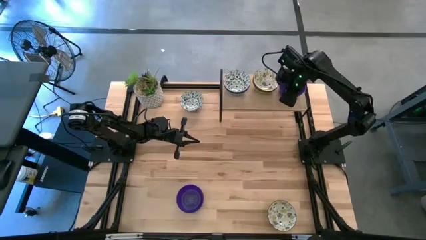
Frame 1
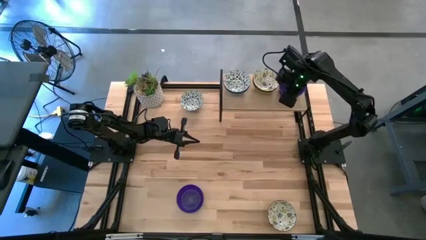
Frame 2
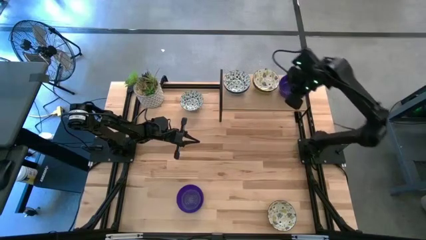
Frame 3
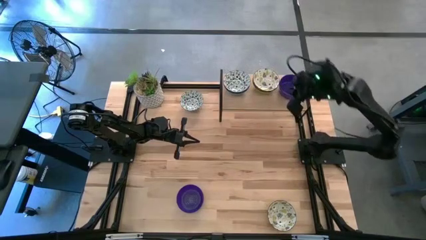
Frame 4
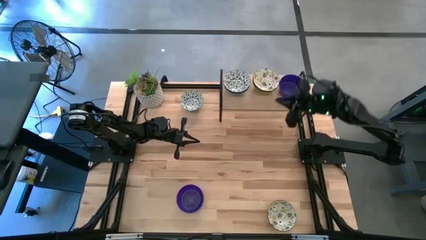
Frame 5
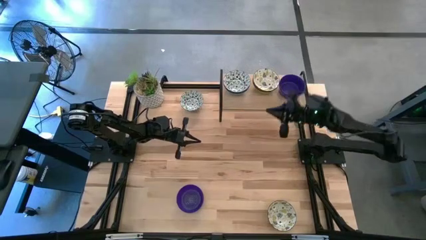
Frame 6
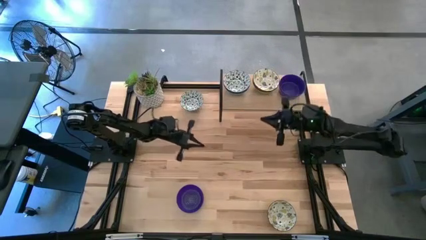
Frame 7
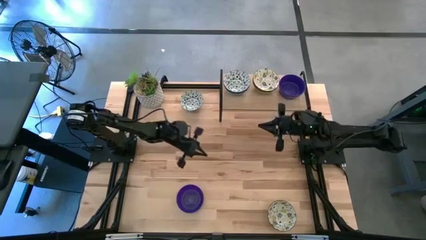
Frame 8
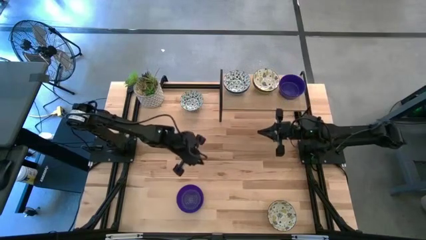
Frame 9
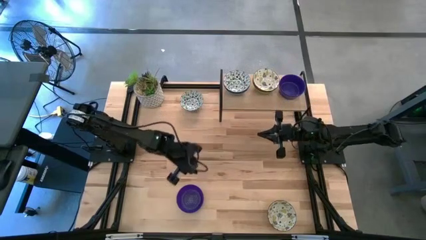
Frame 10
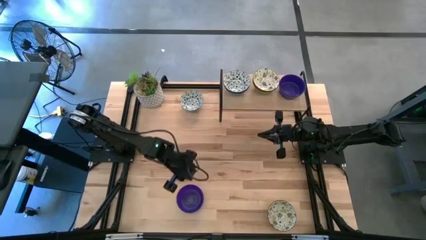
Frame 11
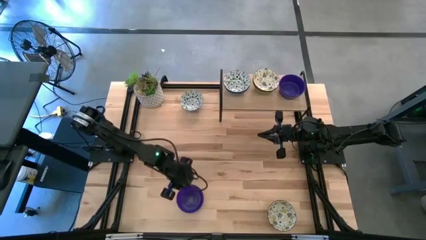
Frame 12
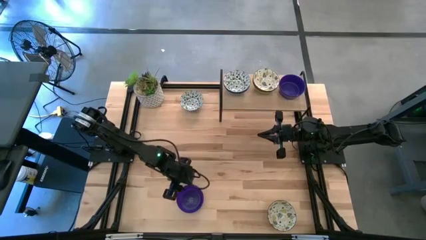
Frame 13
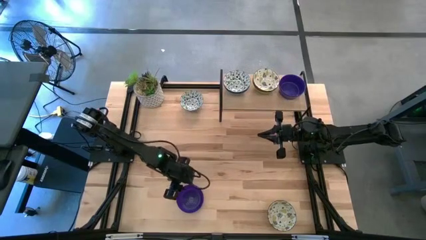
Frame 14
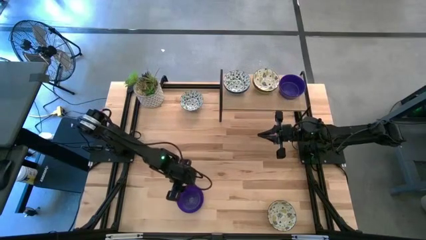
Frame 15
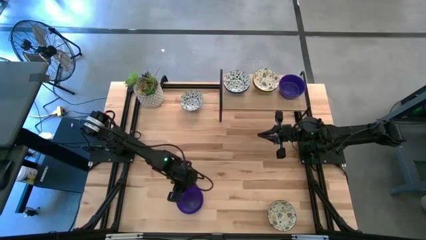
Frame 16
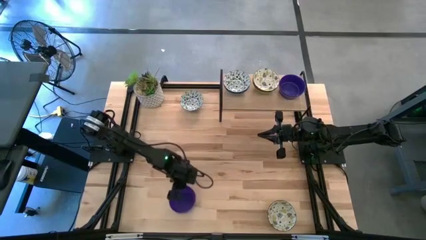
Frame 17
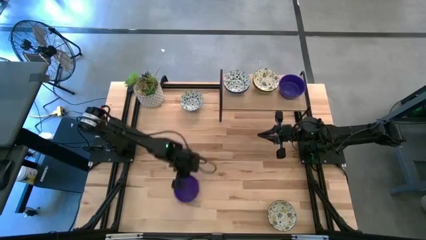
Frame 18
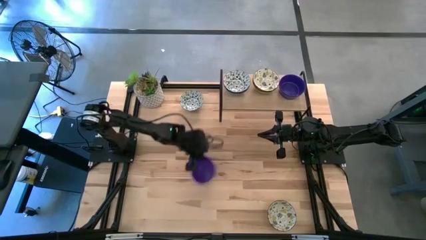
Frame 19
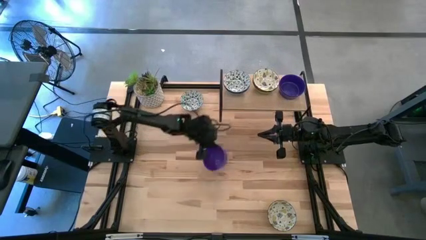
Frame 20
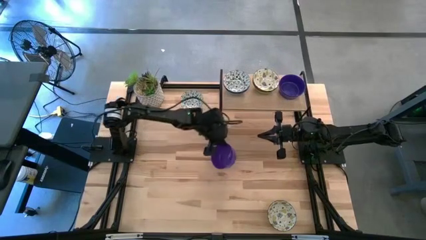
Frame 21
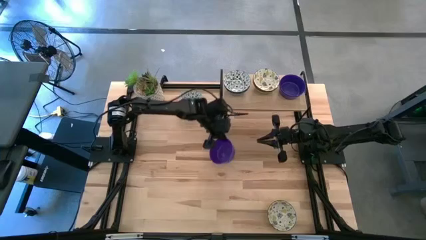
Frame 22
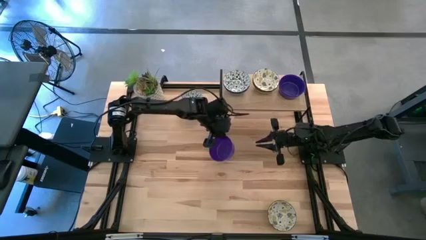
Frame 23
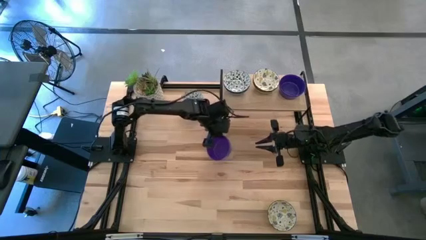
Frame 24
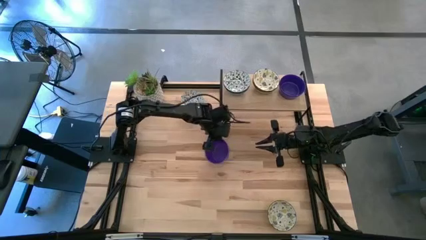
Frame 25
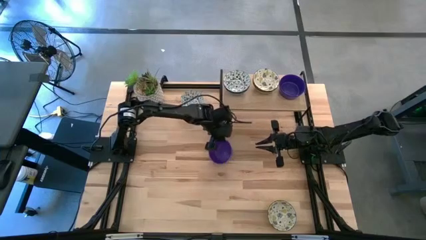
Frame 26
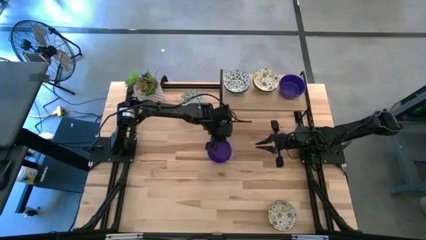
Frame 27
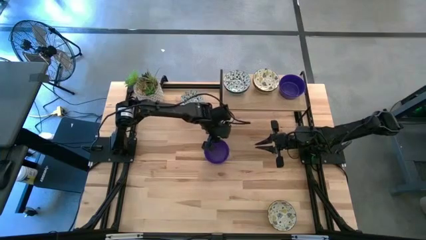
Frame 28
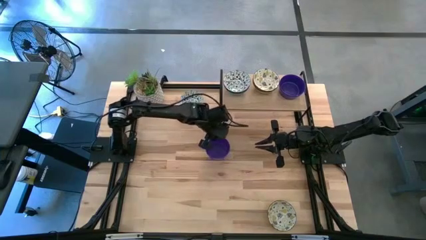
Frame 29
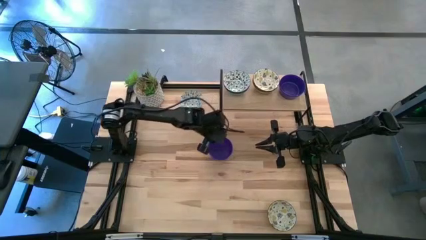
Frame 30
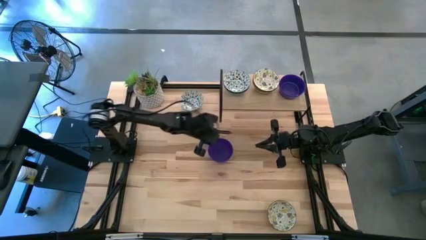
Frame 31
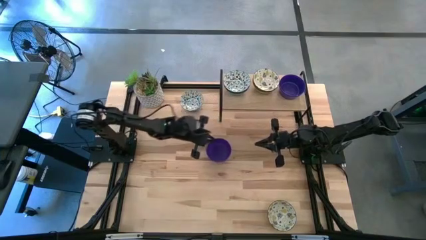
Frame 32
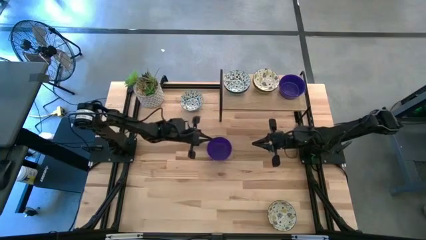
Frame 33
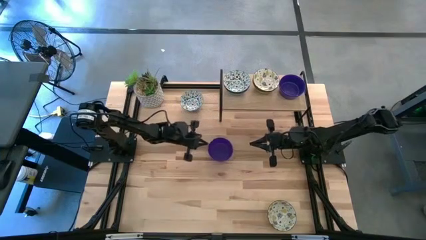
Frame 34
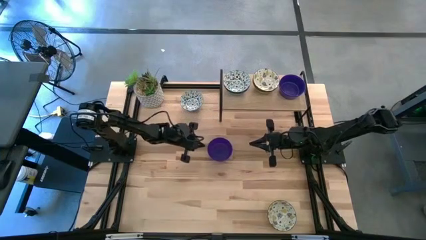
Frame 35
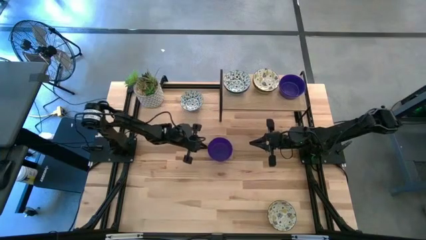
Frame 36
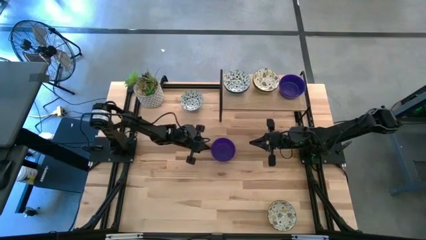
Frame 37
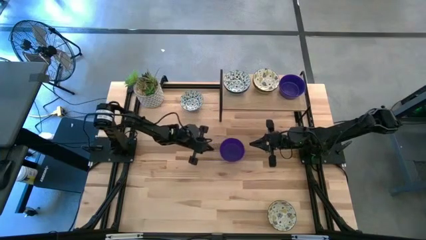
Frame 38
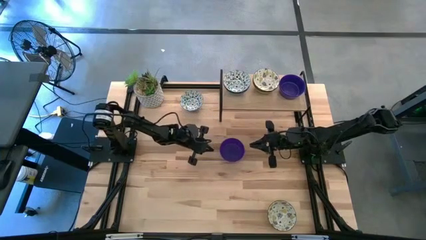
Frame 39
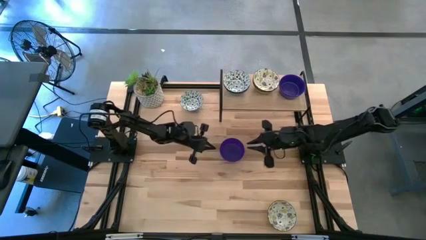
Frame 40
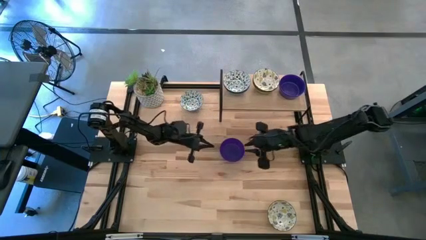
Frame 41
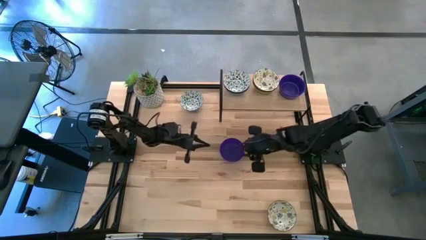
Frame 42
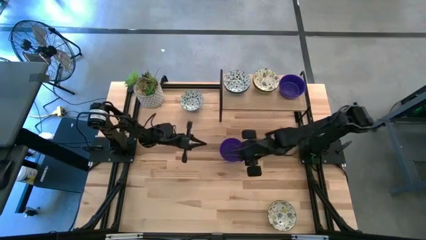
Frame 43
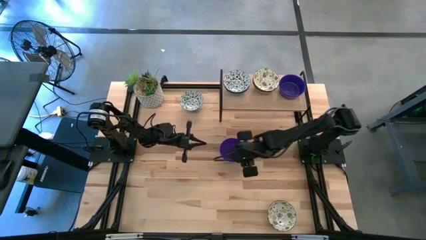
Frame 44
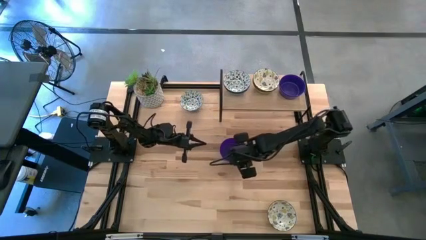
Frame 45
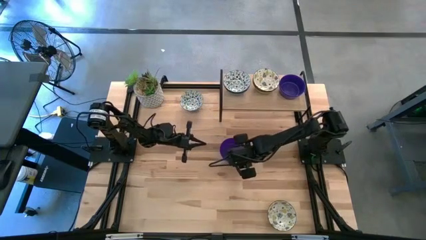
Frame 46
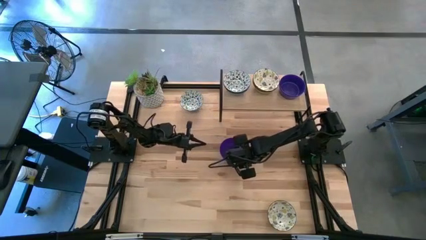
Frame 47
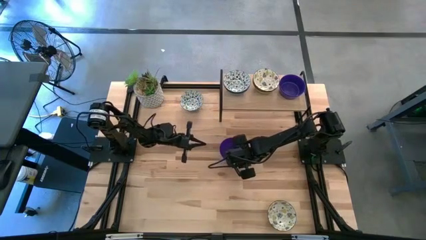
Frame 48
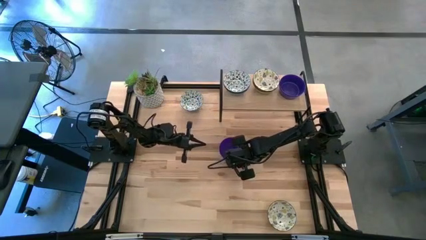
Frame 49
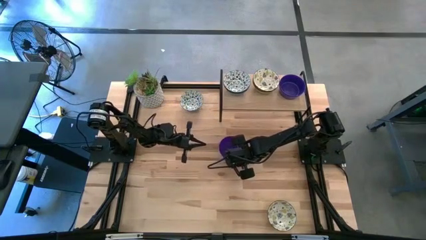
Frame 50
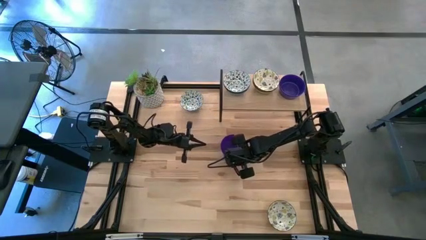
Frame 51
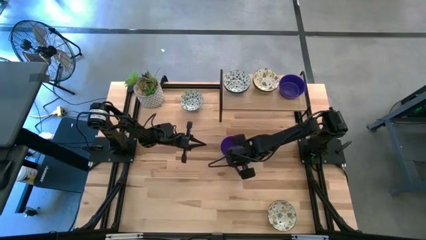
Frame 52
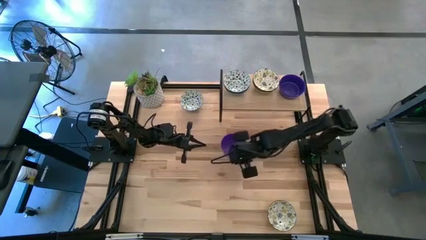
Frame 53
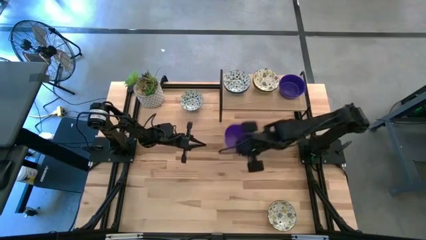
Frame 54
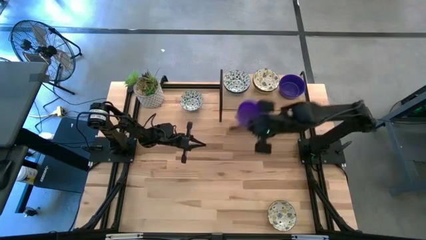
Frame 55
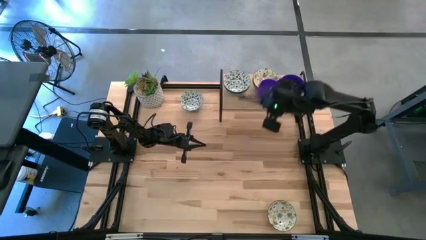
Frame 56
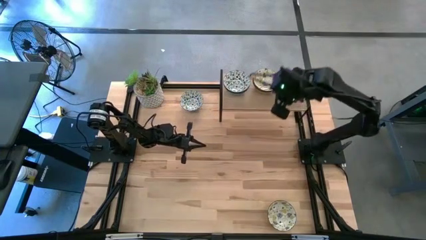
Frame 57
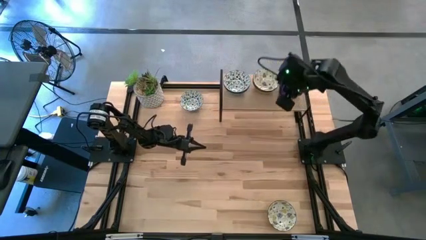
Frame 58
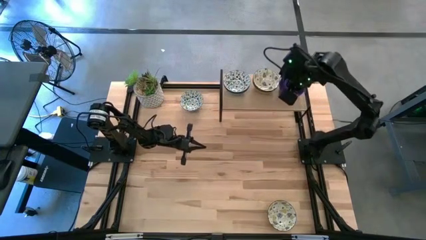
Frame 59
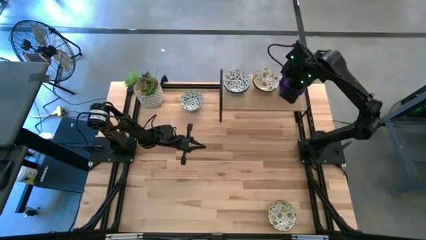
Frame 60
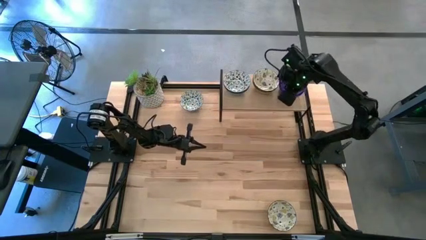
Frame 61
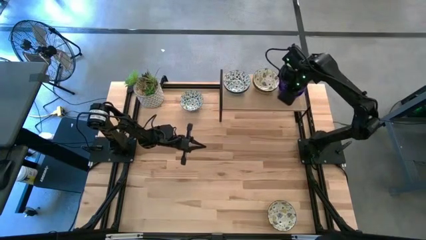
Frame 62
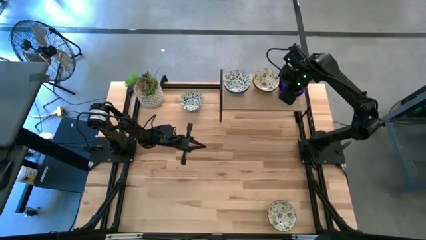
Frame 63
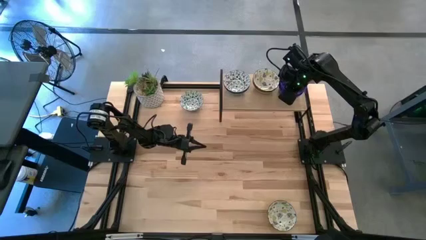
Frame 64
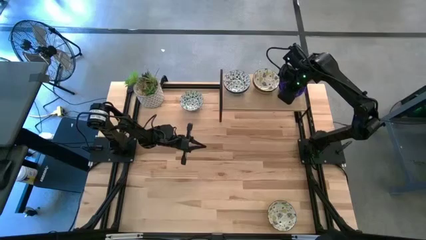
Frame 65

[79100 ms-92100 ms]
Task: Pick & Place Mini bowls
Stack the violet bowl on the violet bowls on the shelf

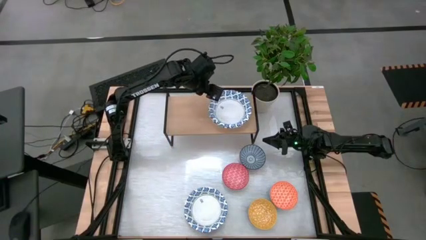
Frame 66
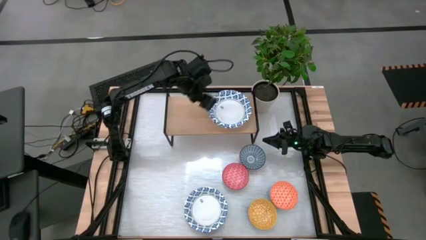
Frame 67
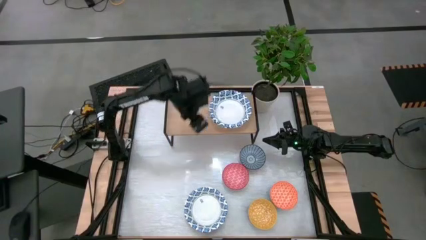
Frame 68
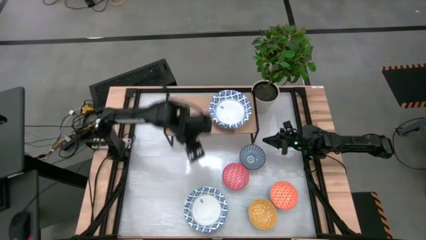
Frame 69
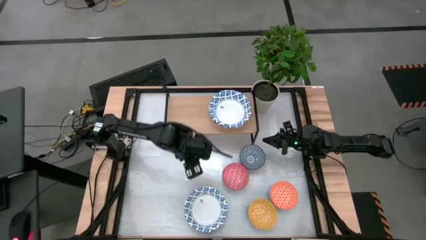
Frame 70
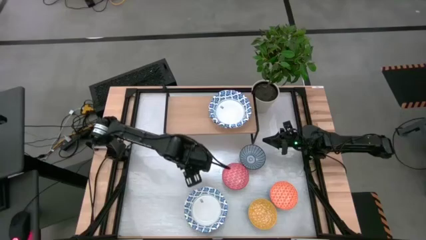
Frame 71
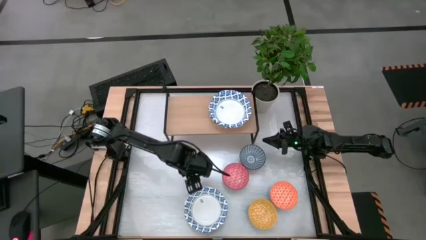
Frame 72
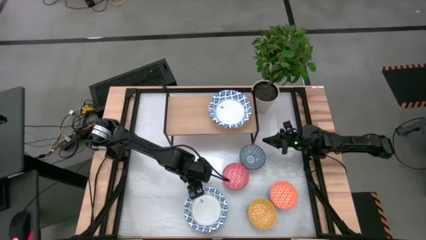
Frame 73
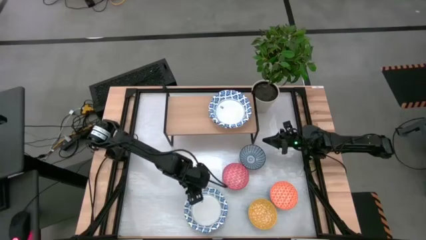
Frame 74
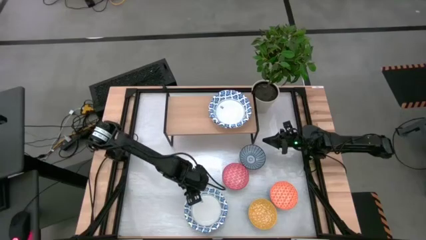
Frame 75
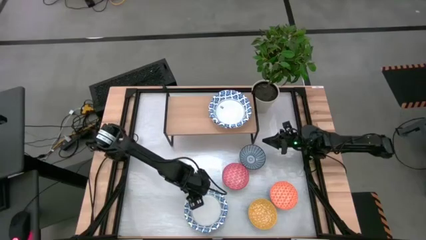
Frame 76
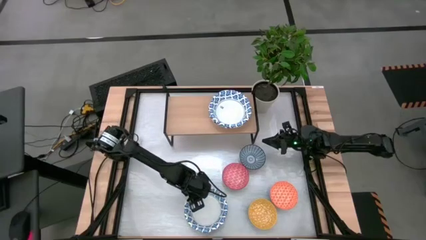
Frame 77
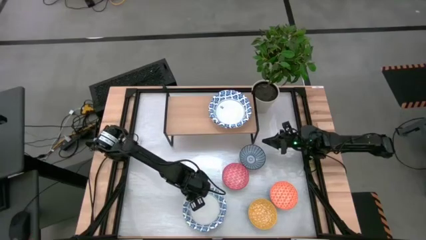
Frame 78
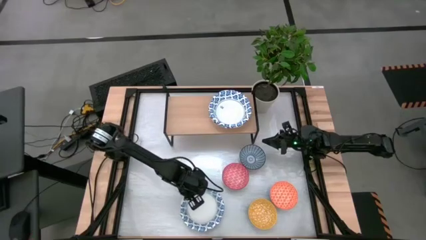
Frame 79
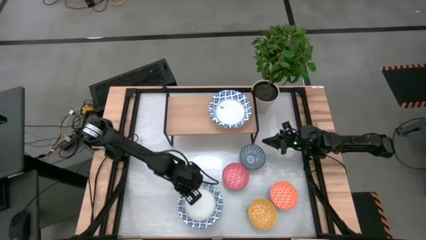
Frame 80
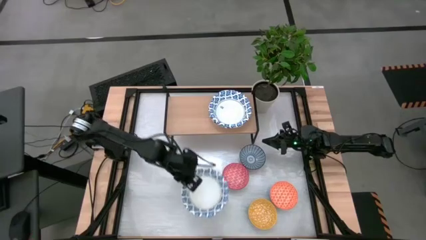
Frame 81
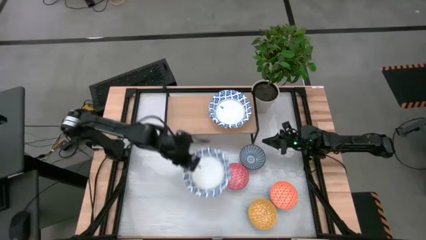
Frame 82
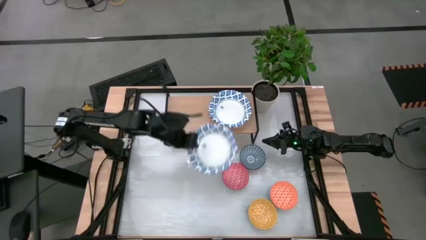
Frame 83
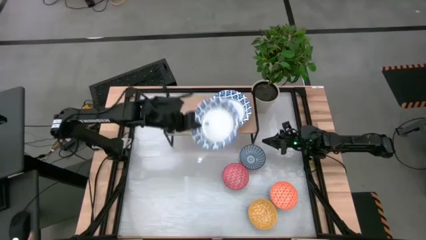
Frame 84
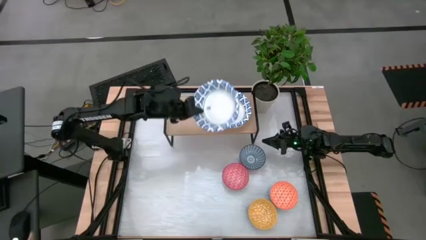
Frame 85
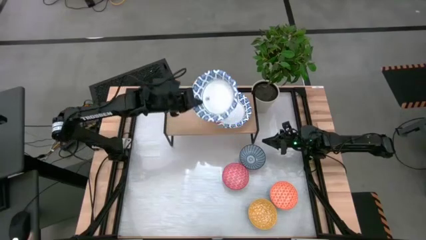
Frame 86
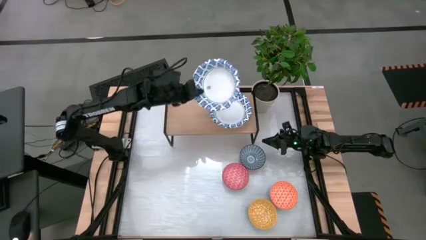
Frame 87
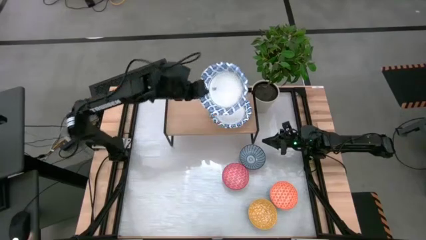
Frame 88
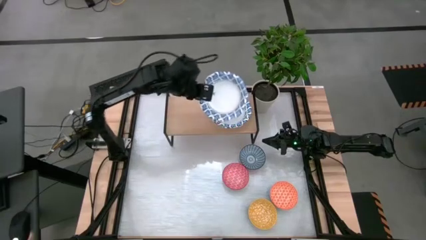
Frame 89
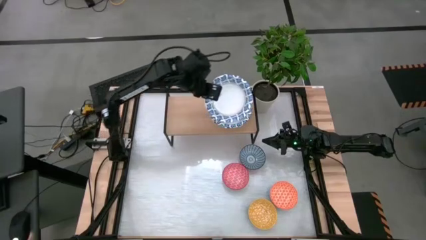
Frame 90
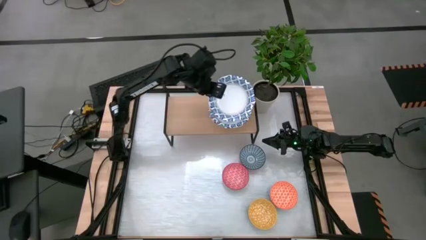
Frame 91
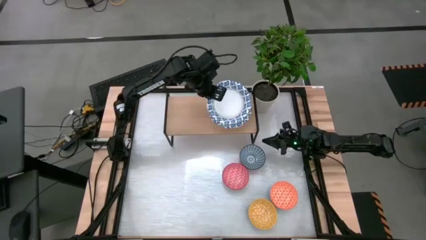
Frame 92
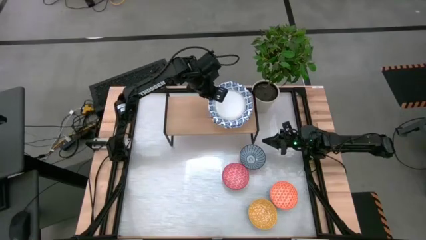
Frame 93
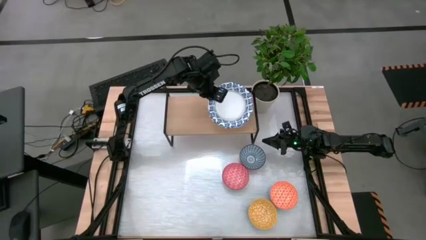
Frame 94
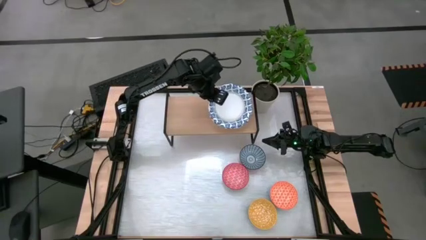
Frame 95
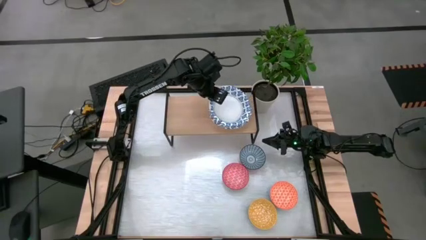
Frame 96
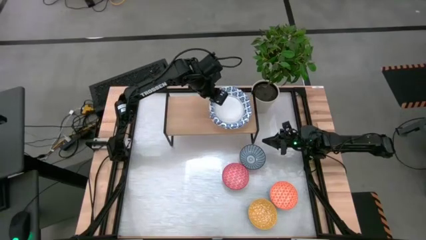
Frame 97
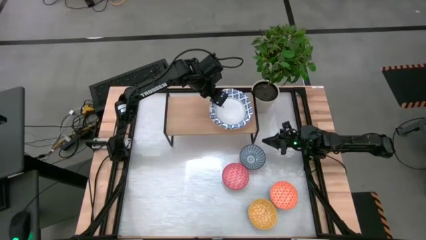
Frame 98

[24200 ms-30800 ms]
Task: Place and stack bowls onto a shelf
Stack the white patterned bowl on top of the other white patterned bowl on the shelf
